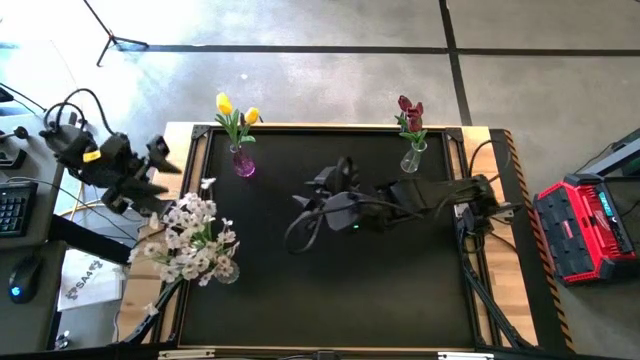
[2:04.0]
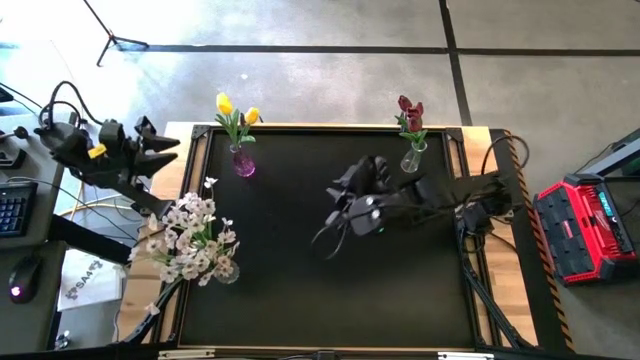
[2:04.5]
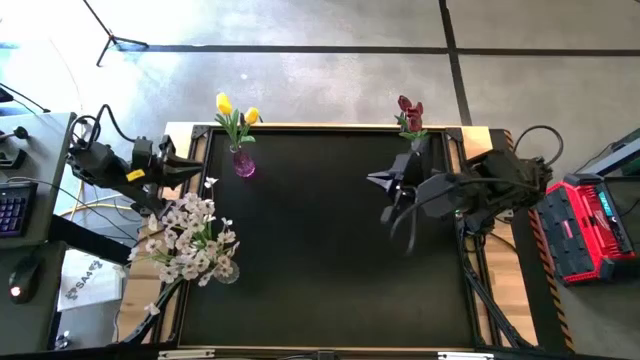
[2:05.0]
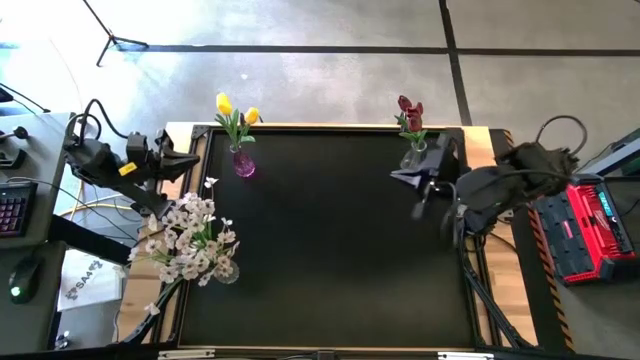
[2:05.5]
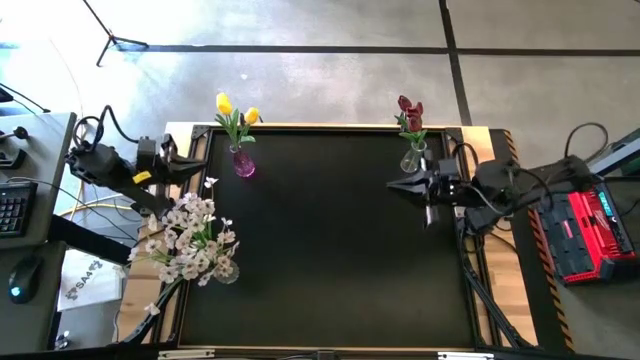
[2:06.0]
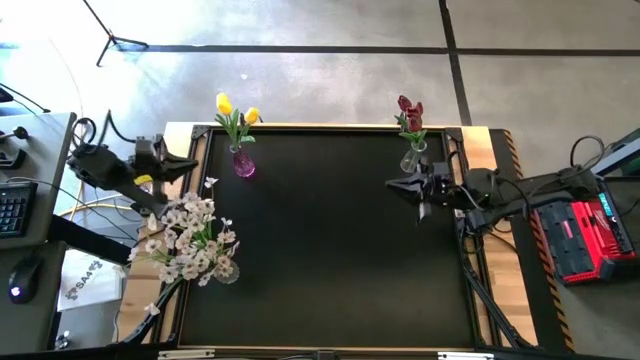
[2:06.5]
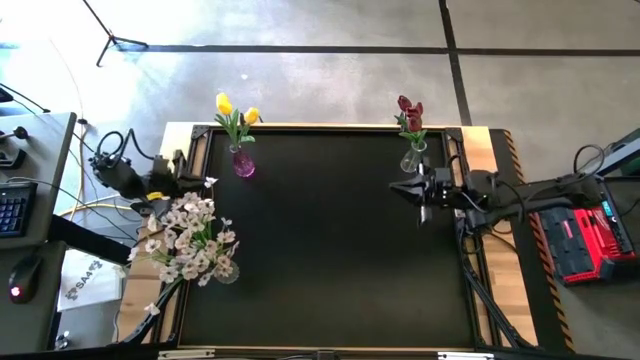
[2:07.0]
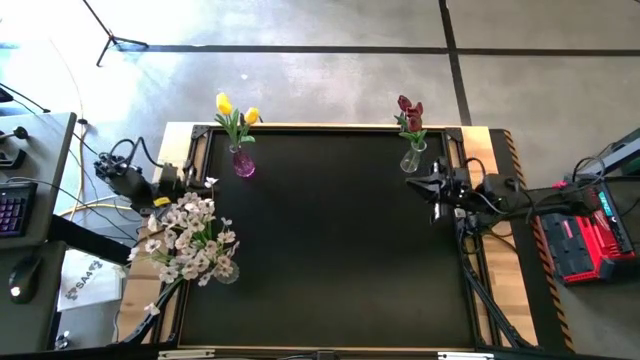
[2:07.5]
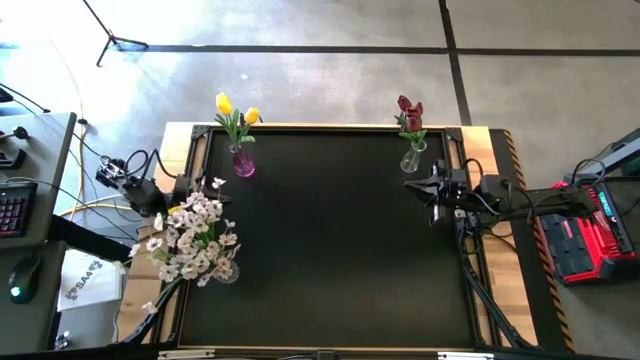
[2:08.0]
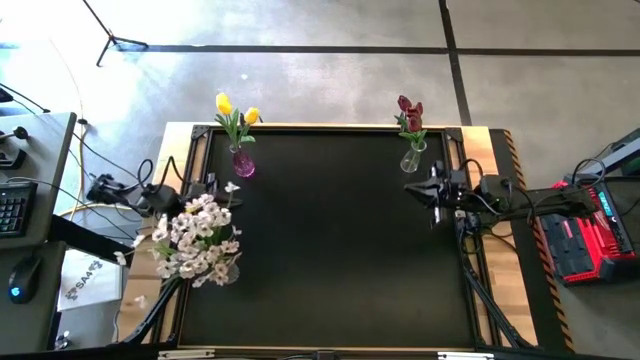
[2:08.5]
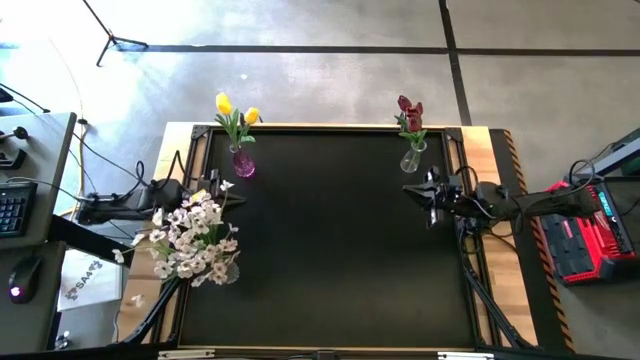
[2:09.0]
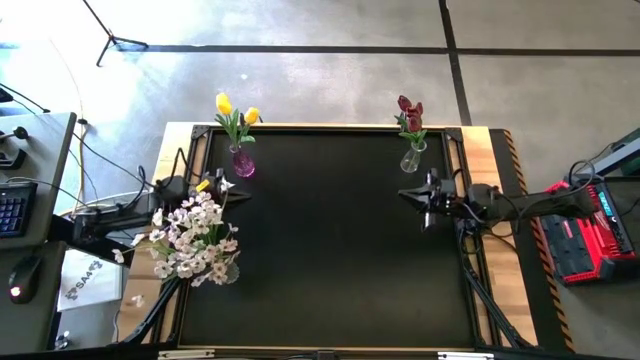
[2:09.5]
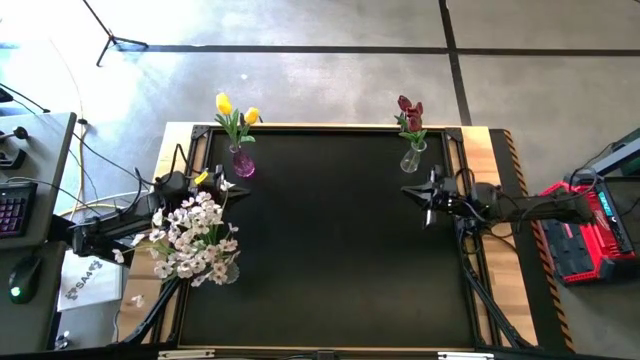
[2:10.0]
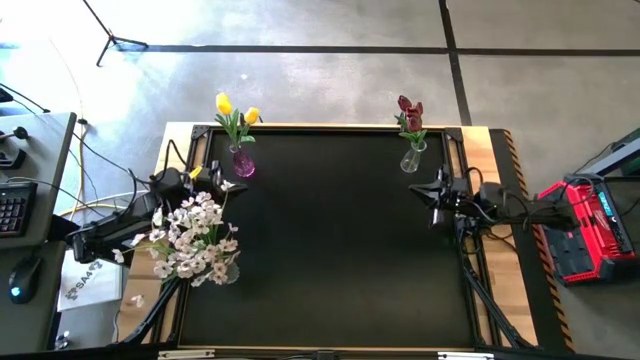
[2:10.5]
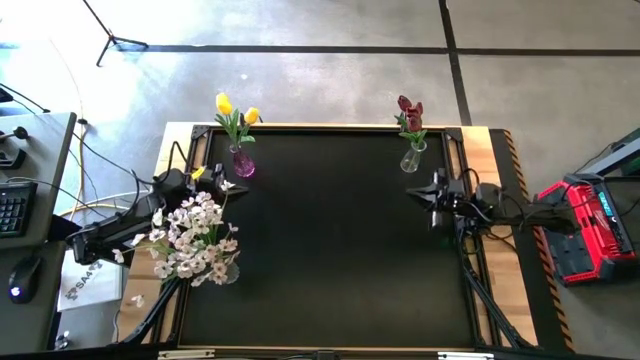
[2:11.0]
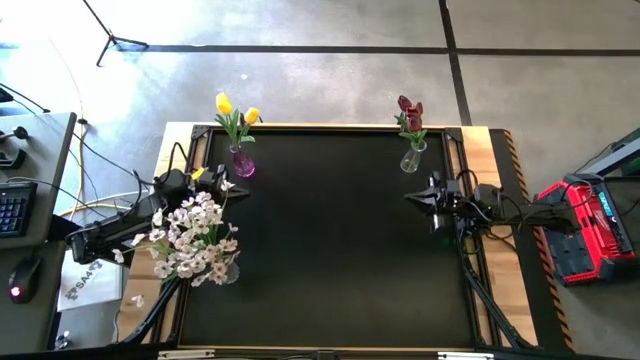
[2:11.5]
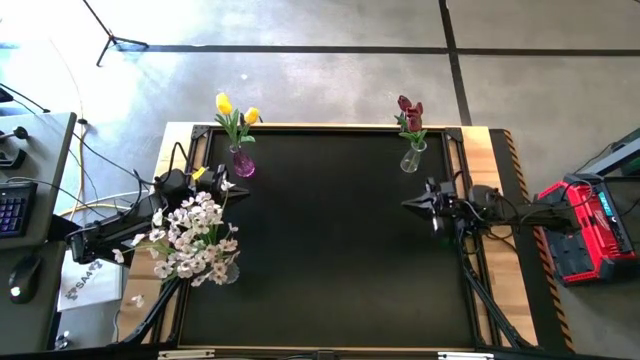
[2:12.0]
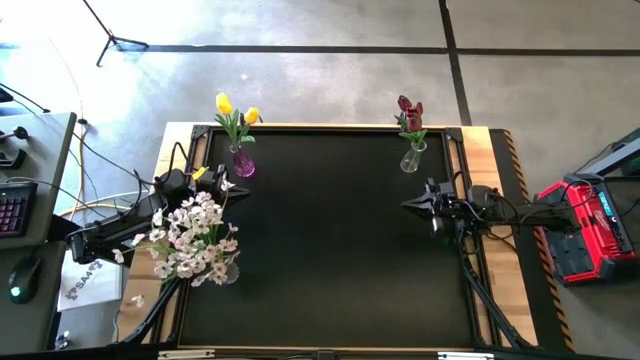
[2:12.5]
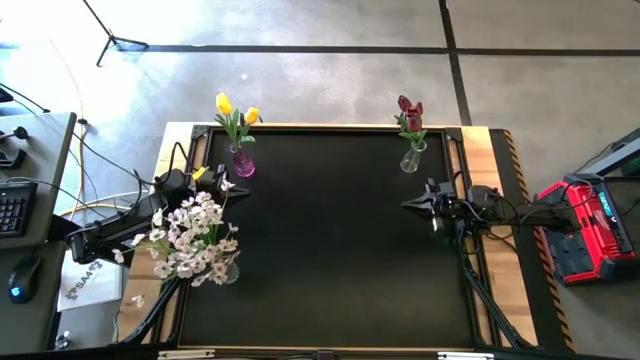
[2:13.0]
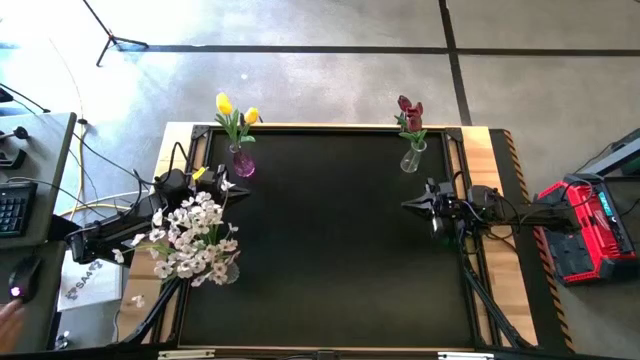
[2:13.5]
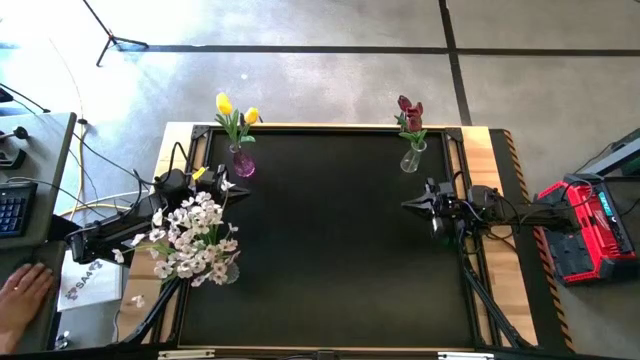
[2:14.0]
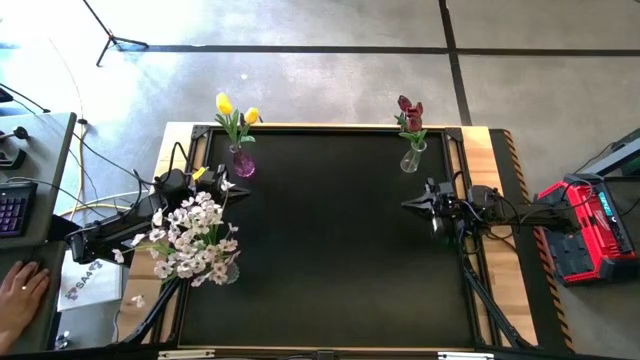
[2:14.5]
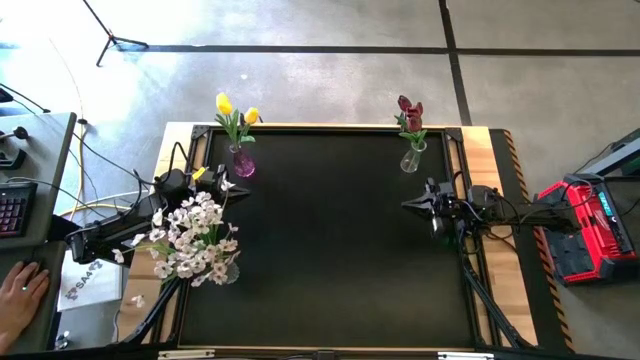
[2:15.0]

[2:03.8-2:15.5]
Task: Sort flowers into vase by color
Return to Home Position

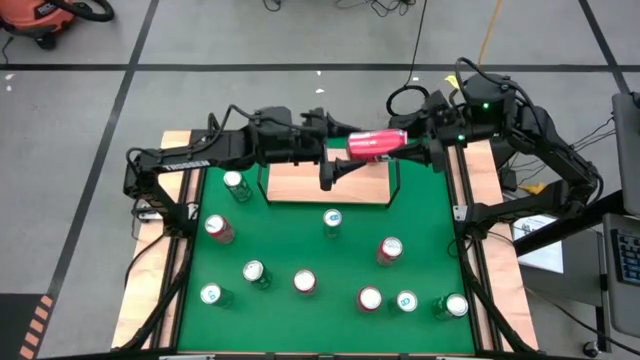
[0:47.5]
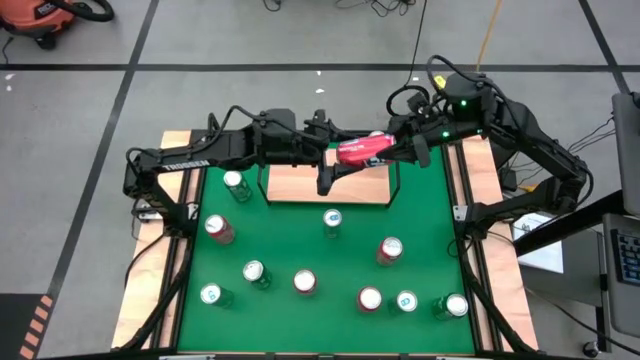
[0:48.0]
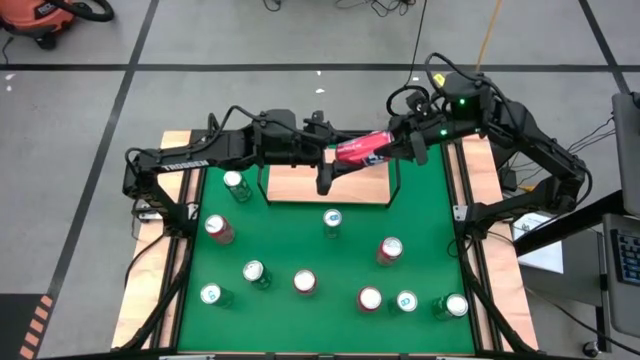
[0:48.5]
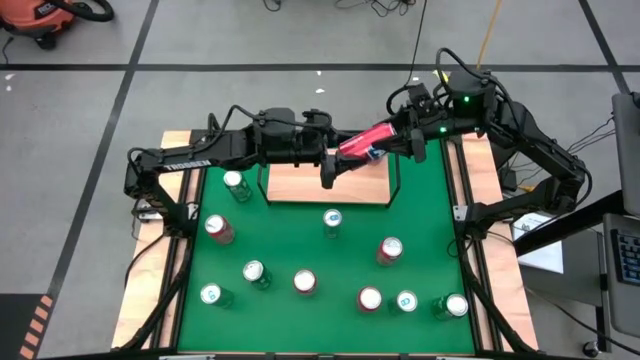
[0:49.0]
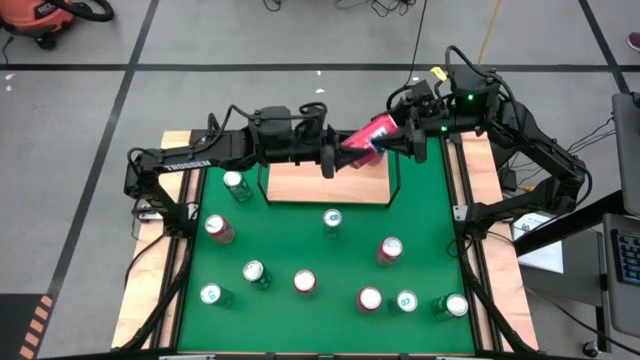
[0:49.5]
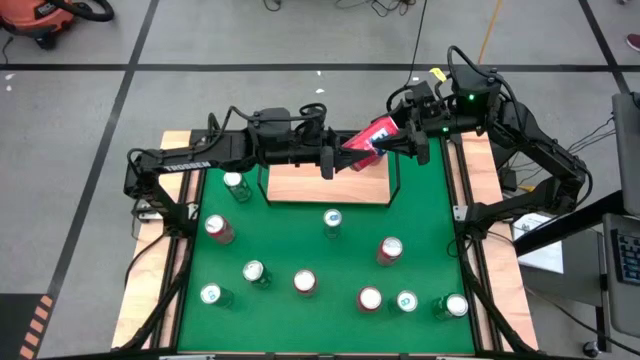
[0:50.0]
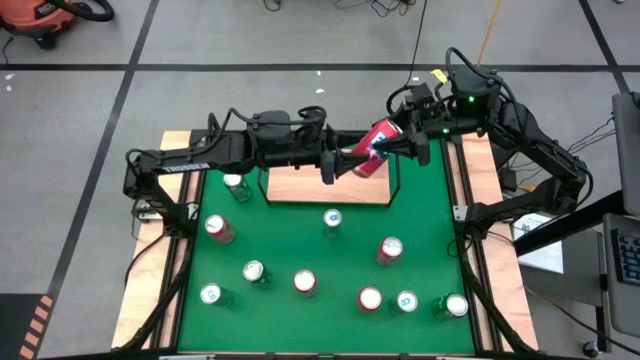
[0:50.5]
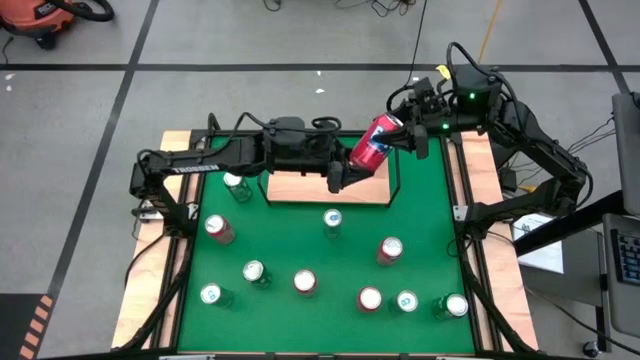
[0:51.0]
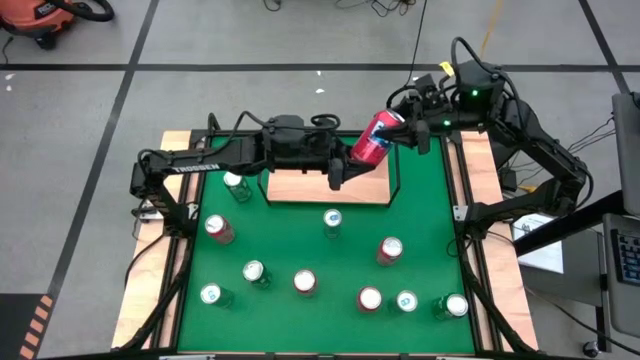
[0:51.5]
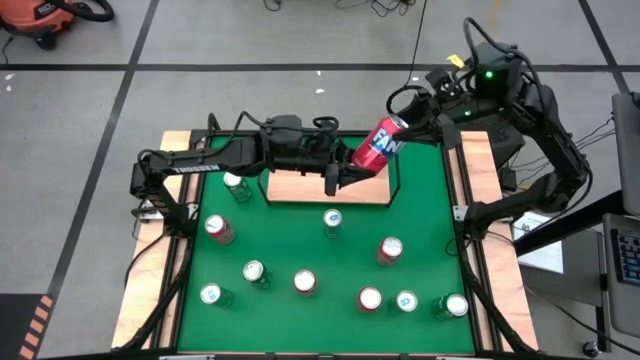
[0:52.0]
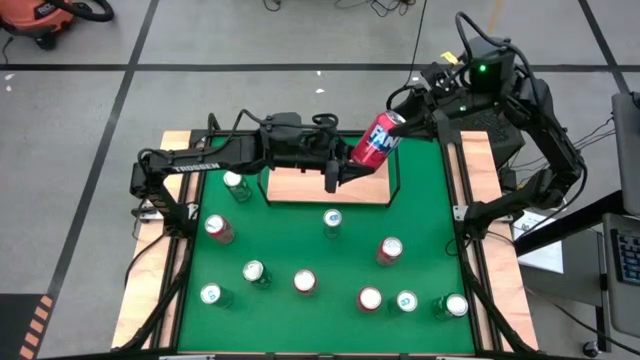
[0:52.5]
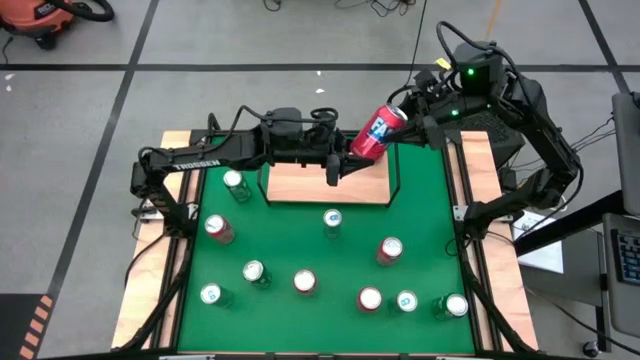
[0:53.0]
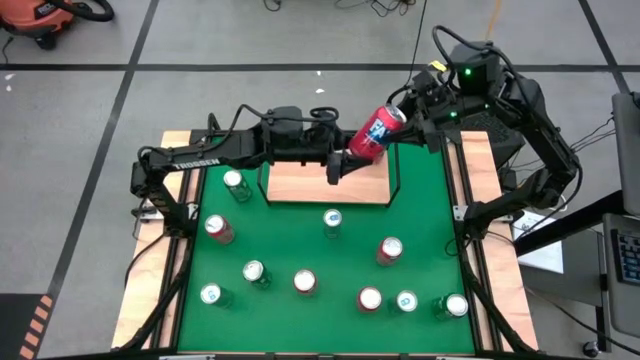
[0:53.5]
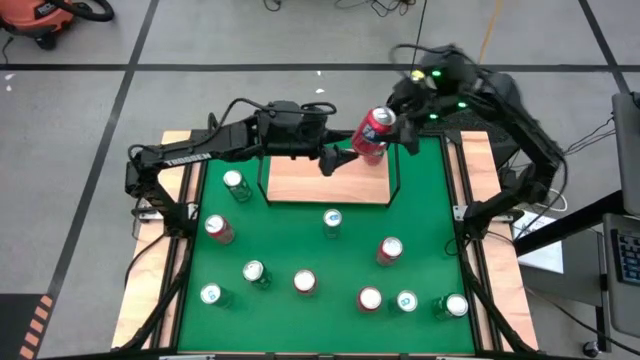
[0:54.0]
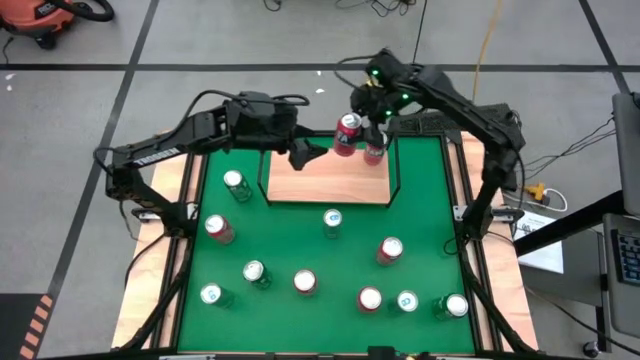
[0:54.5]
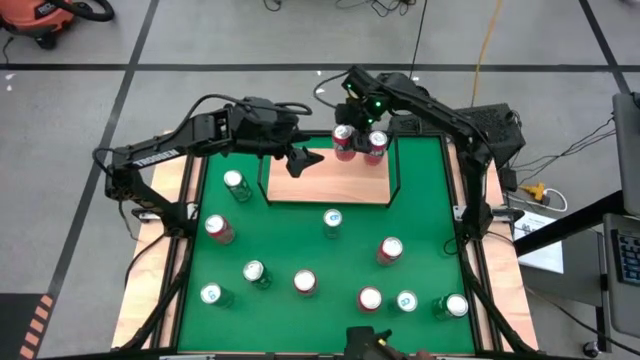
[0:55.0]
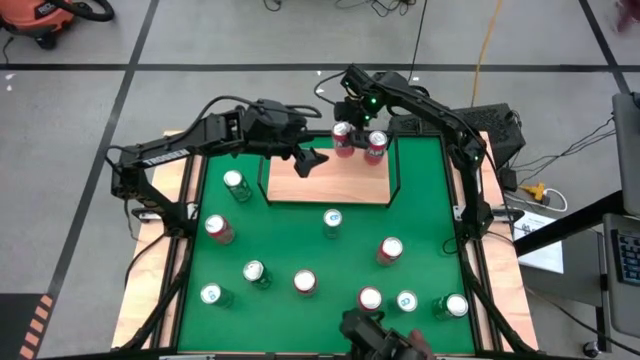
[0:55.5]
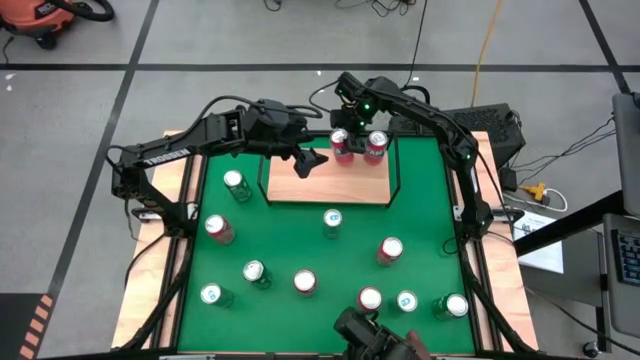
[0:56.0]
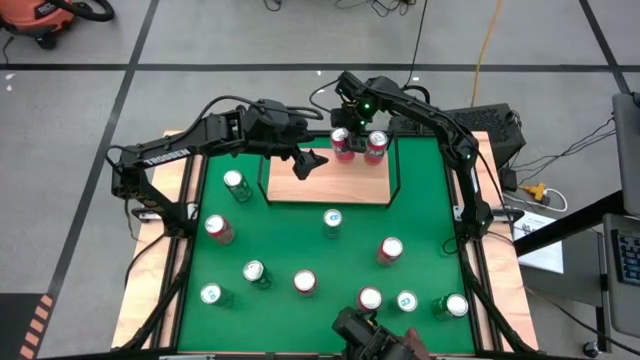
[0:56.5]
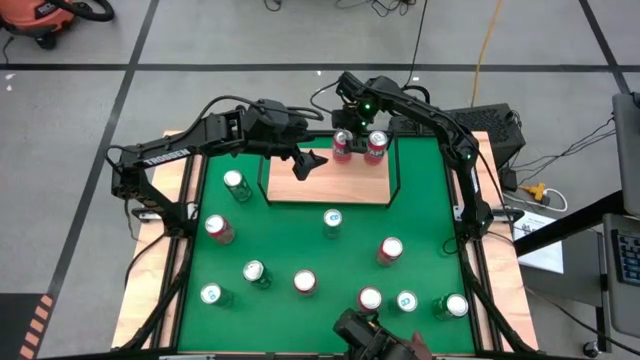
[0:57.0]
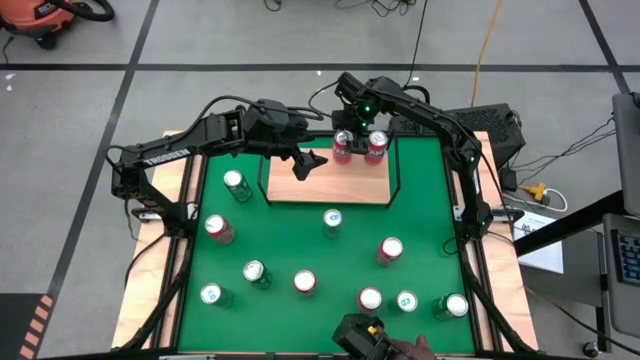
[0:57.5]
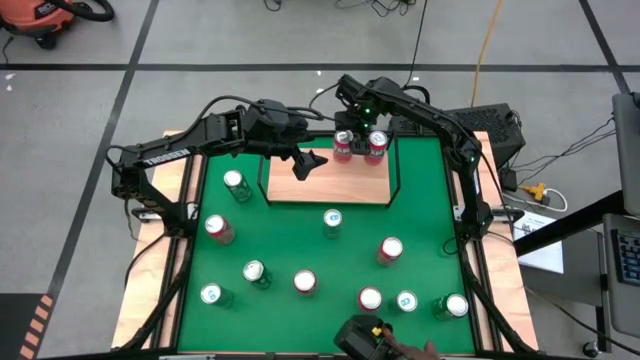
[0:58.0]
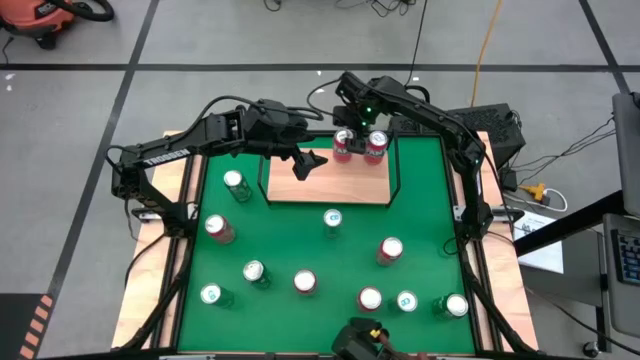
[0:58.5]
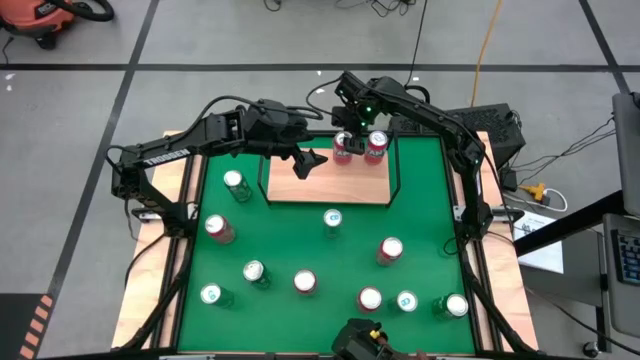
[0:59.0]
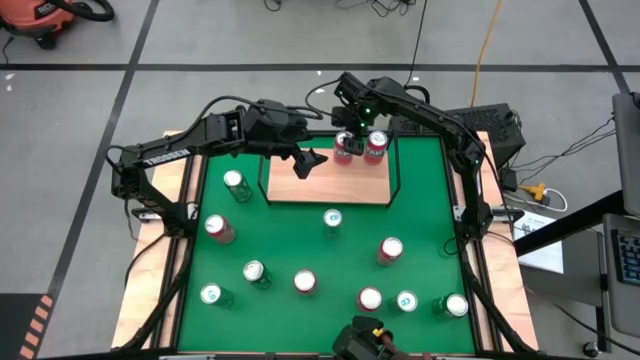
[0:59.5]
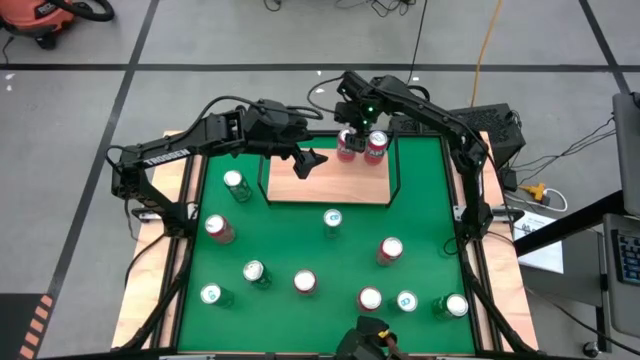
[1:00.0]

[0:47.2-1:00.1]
Task: Place canned beverage on shelf
Put the red soda can on the shelf
